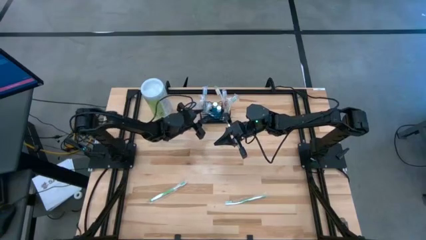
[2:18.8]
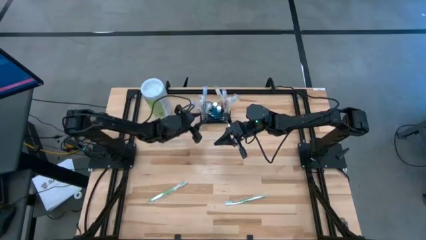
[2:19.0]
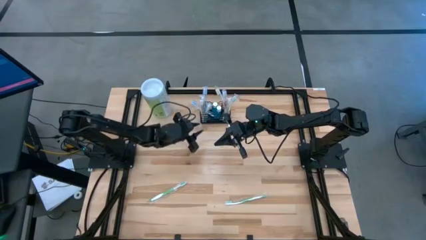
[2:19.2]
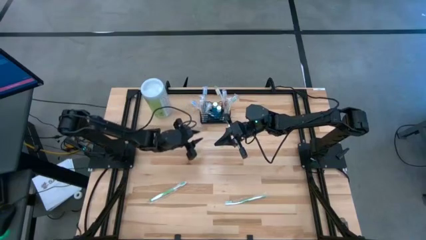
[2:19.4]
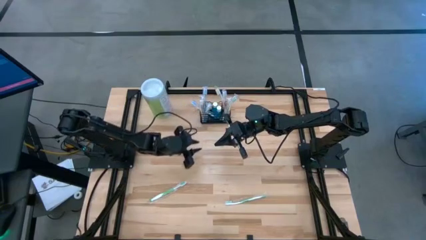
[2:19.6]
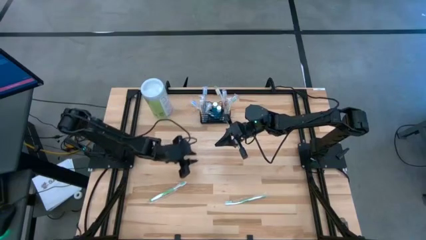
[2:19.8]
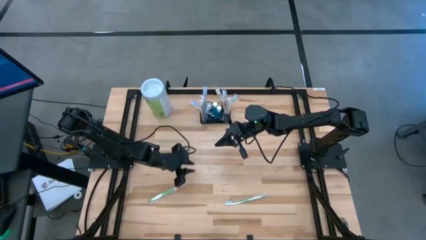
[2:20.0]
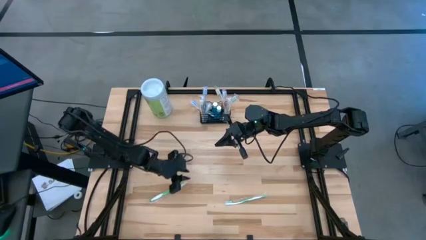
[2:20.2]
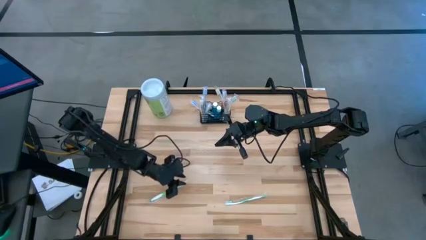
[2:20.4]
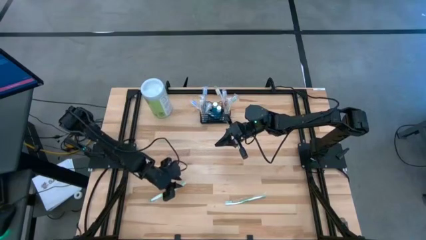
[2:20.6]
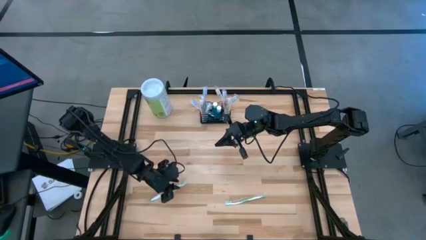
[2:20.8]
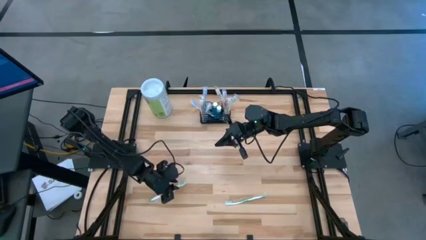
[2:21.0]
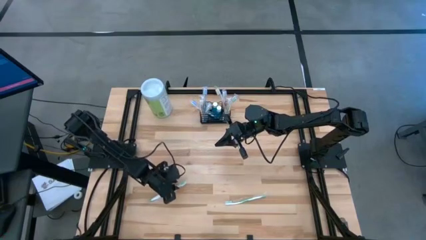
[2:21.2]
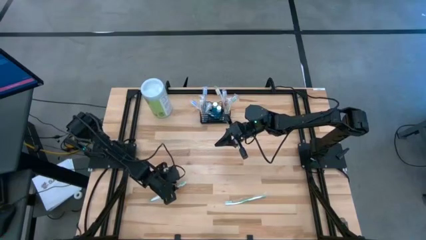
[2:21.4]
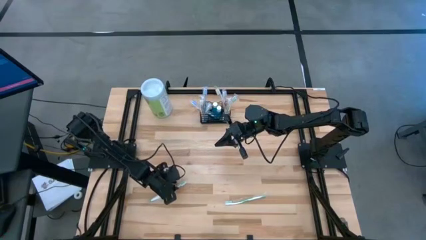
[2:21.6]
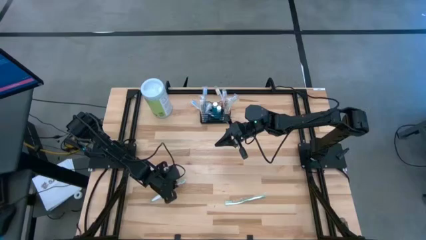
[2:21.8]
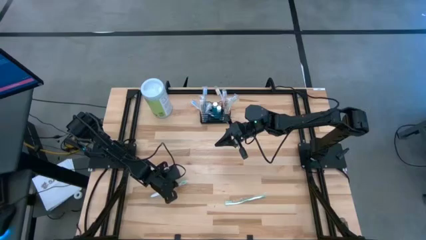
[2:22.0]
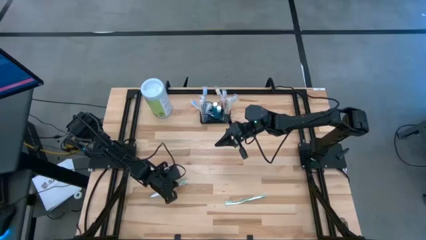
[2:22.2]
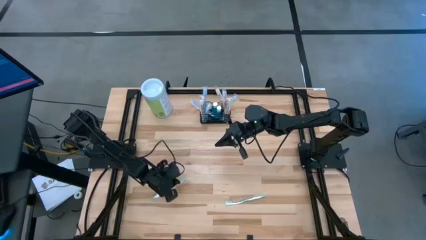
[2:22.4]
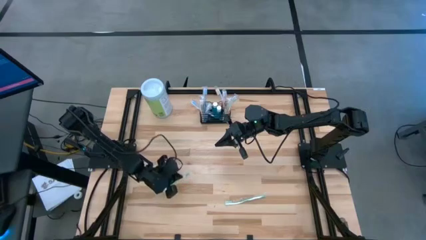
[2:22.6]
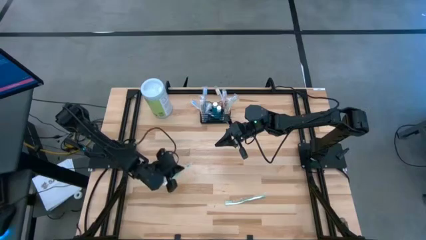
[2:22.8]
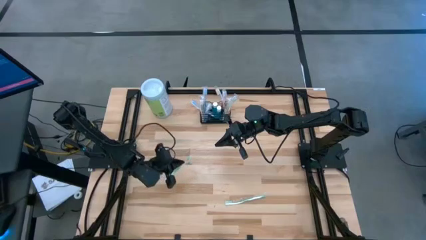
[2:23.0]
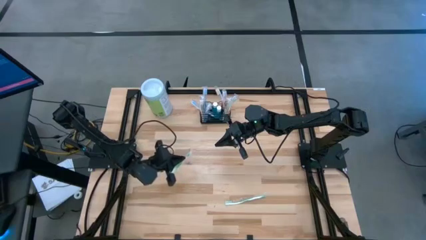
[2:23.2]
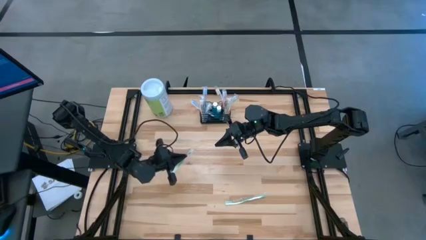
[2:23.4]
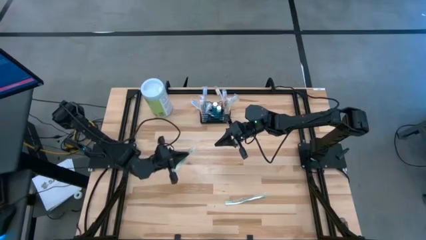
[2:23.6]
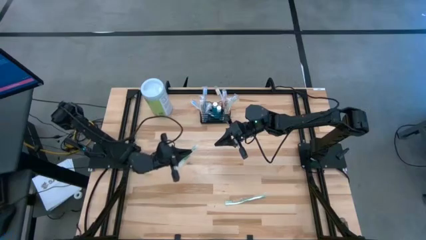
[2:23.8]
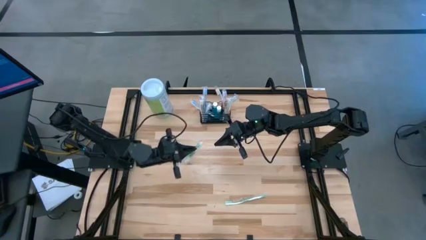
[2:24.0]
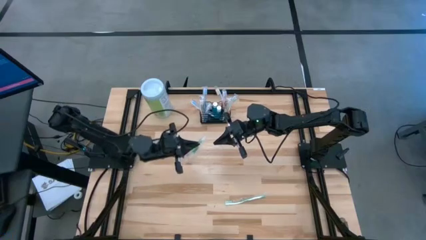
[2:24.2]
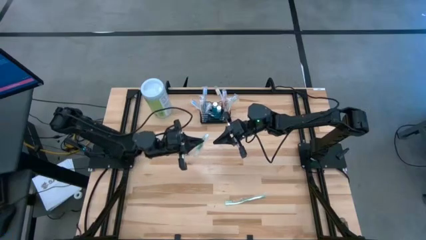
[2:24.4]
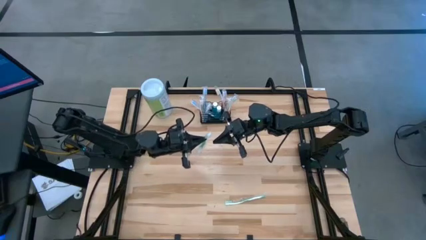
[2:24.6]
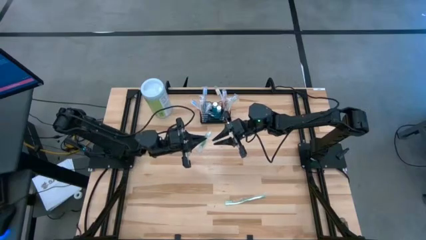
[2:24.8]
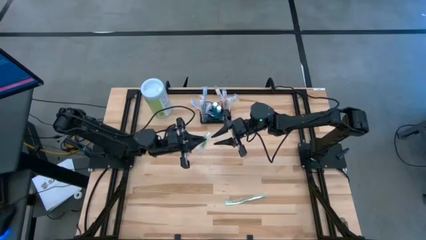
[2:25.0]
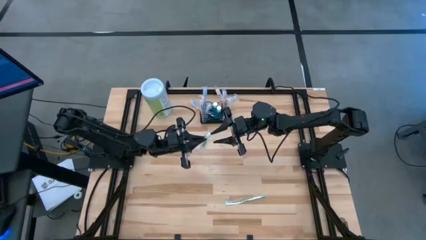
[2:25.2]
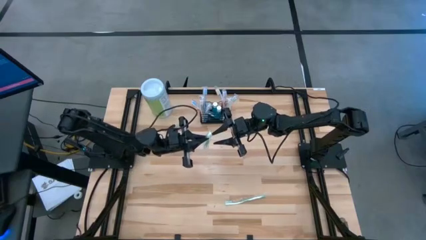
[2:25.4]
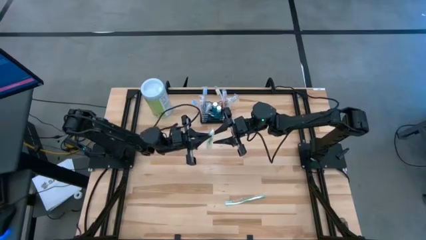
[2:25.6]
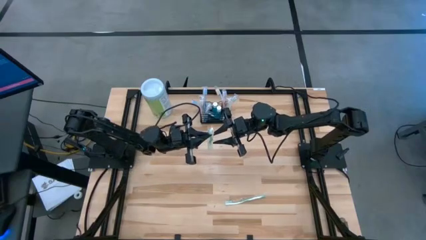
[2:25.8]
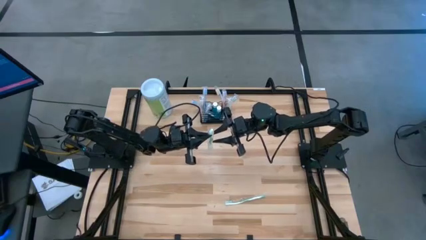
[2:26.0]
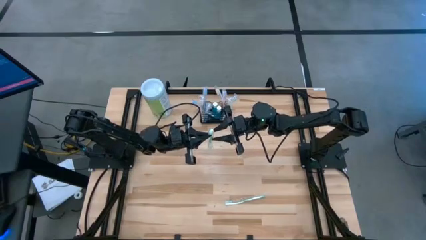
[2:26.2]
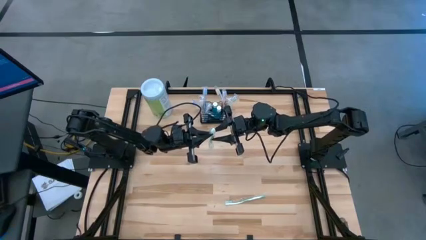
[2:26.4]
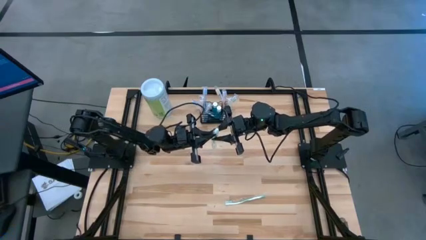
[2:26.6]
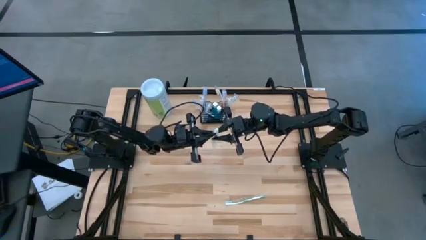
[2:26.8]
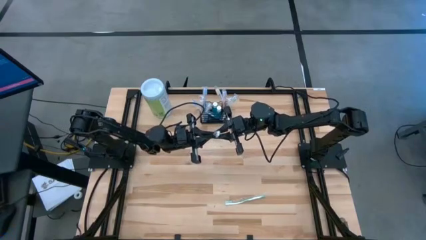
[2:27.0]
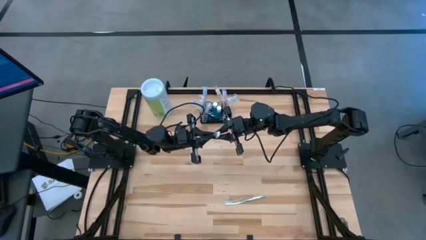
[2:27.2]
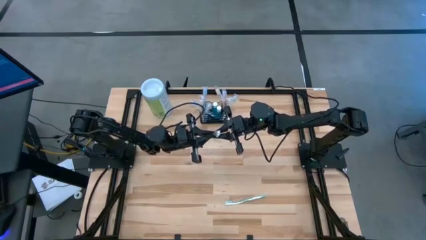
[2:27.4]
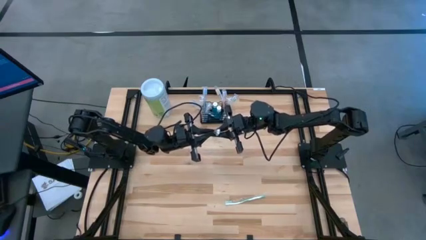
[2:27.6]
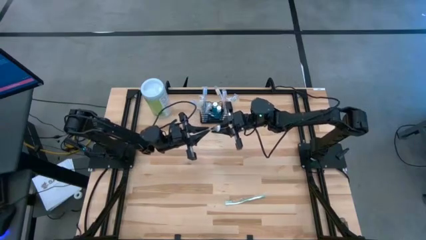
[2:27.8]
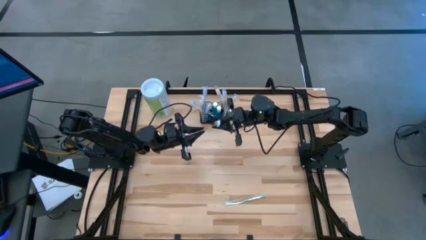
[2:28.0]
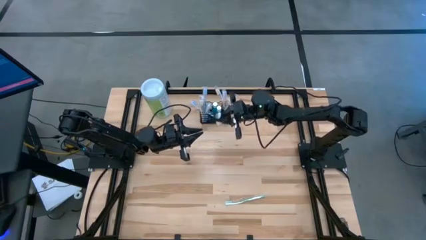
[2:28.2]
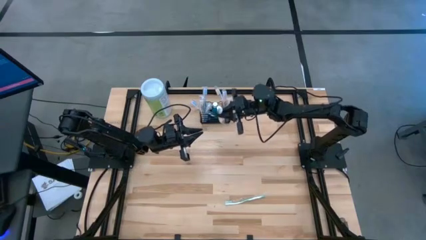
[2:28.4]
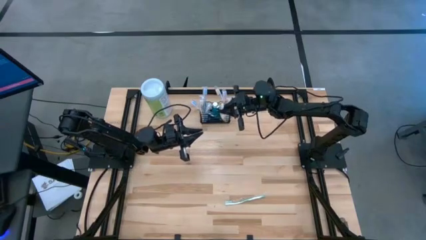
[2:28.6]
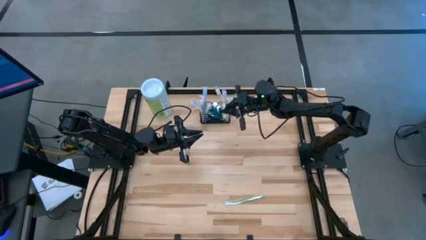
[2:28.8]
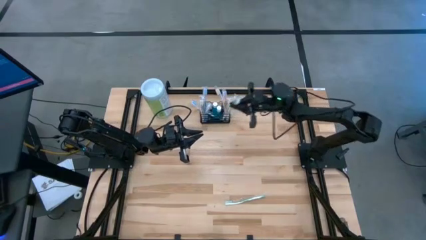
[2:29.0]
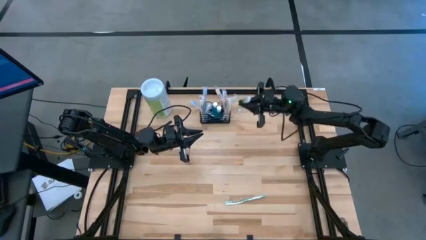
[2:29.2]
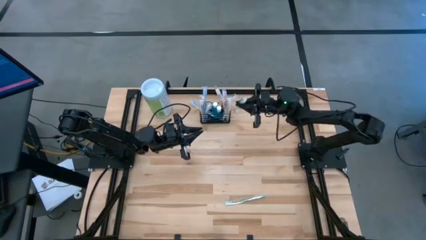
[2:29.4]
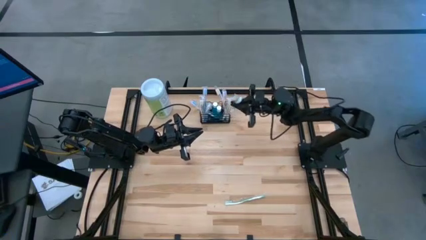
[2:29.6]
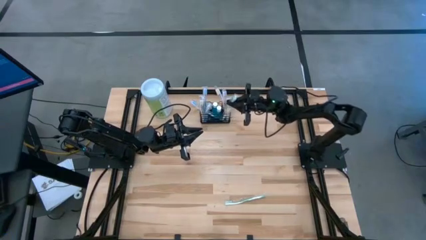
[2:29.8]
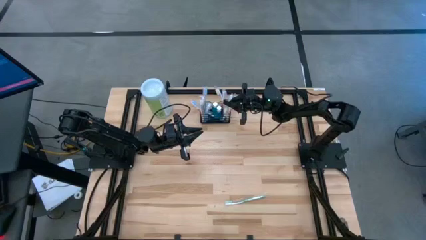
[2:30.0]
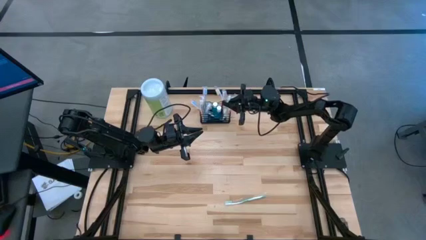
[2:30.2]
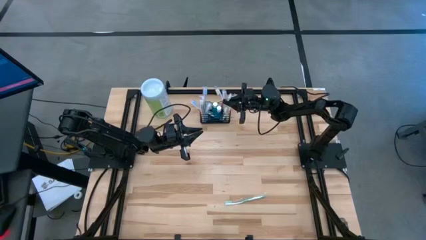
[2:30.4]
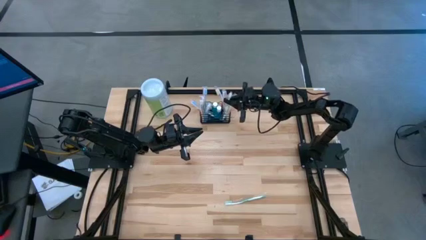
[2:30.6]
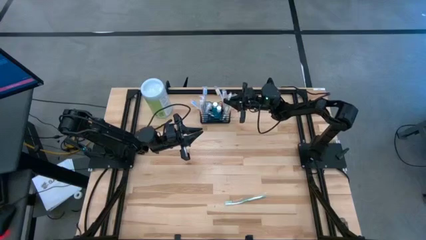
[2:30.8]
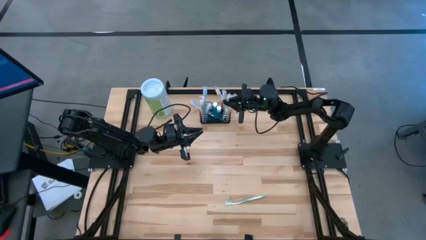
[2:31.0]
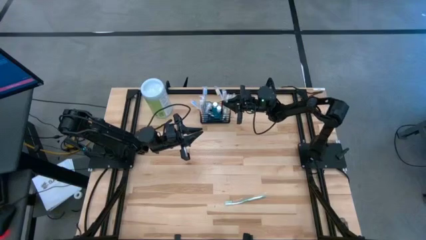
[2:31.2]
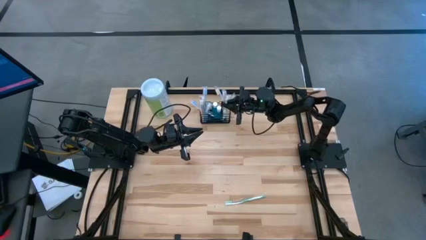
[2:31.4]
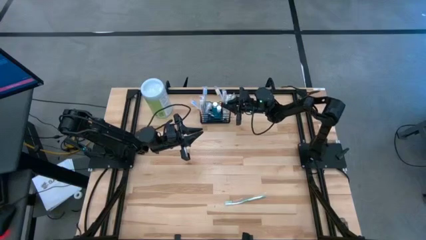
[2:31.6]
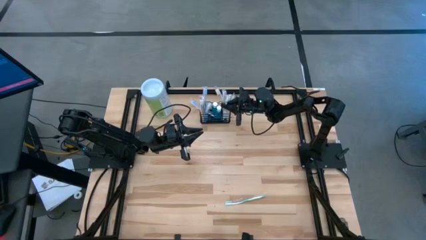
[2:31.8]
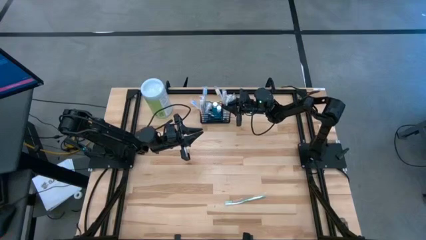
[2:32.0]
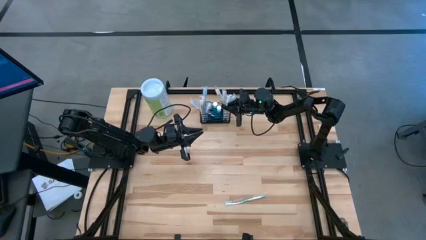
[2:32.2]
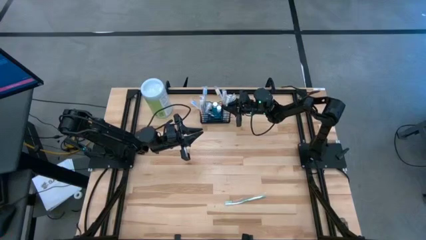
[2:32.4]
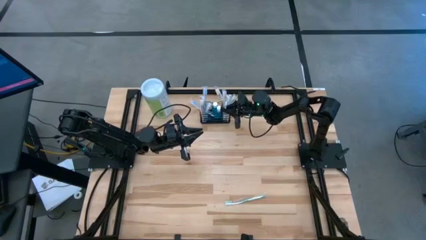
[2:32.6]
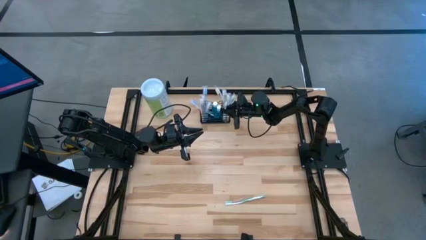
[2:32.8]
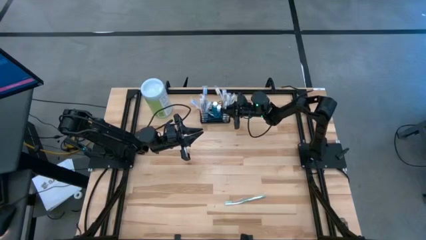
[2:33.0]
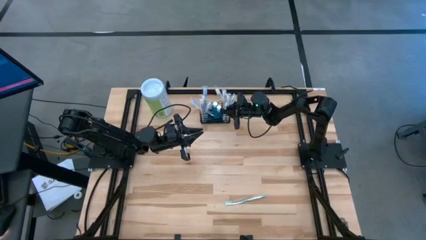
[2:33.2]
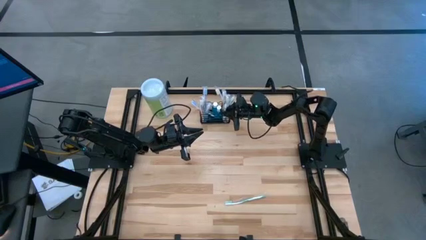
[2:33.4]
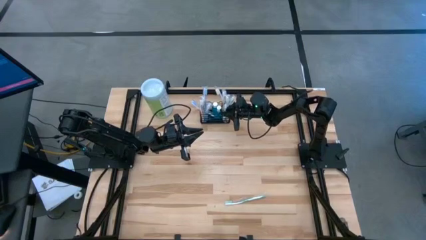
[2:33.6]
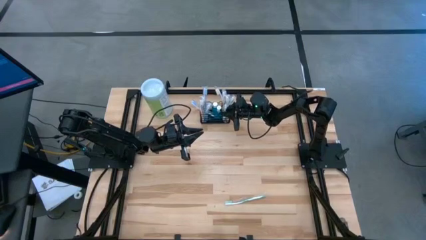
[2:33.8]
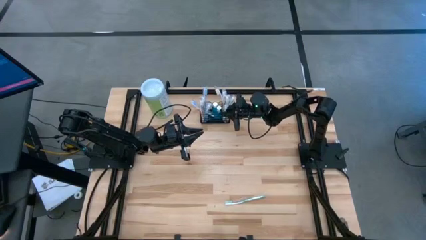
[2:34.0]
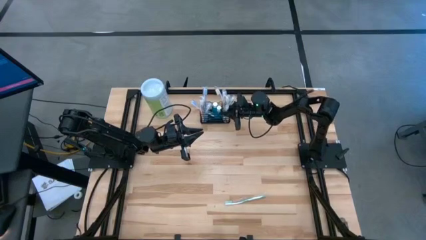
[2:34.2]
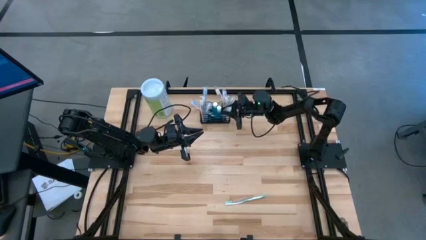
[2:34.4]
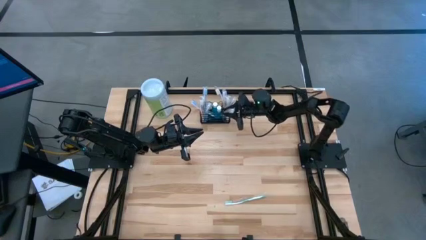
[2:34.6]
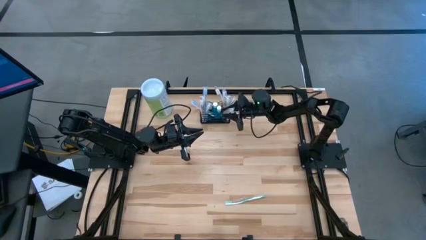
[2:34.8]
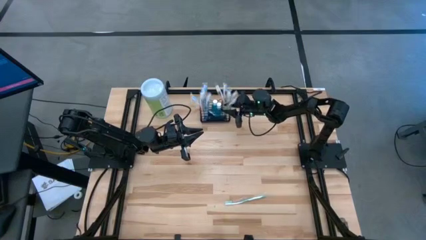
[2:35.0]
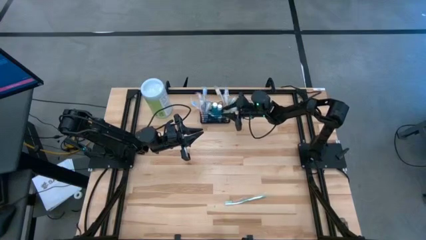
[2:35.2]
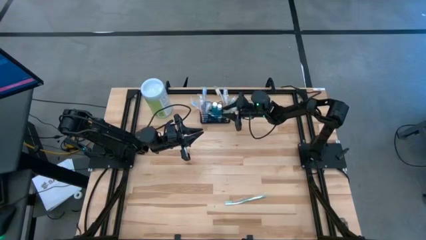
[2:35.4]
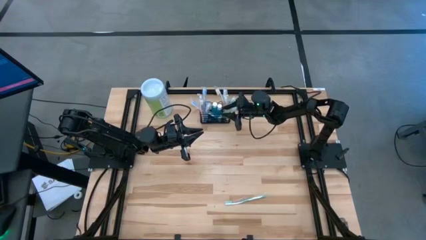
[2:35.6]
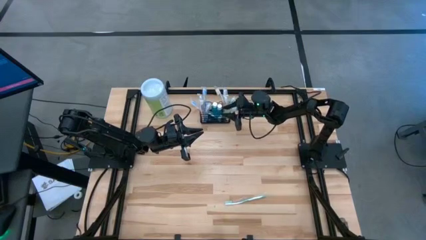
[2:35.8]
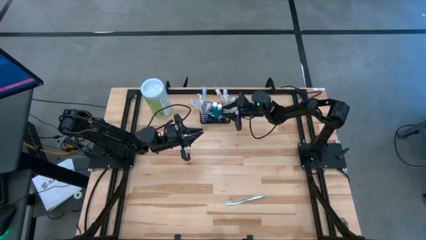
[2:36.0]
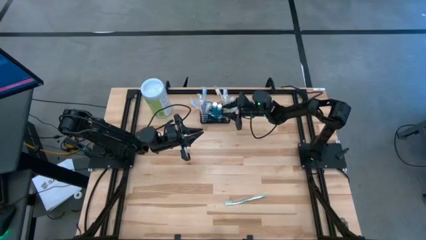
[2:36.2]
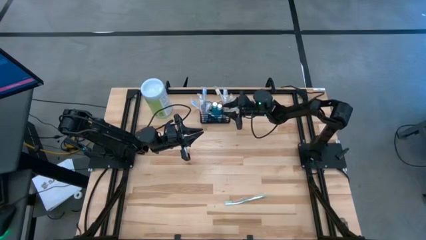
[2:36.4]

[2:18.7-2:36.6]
Task: Pick & Place toothbrushing station
Put the green toothbrush into the black wire organizer
